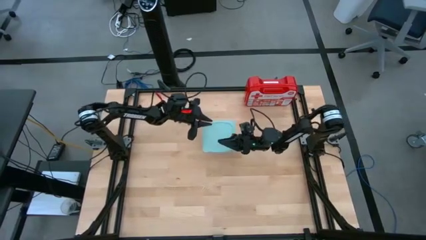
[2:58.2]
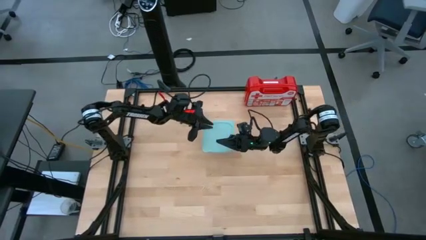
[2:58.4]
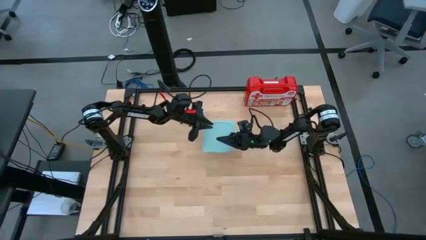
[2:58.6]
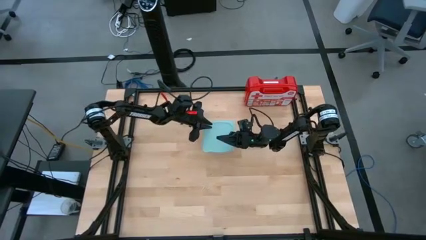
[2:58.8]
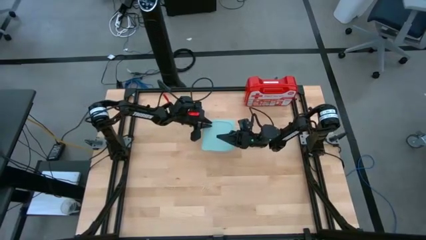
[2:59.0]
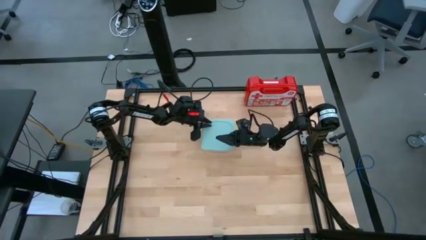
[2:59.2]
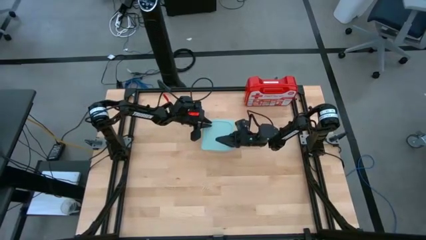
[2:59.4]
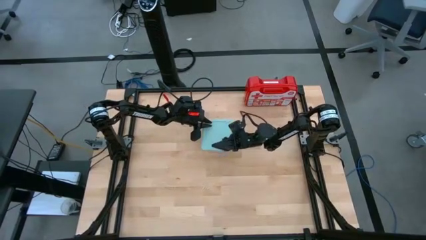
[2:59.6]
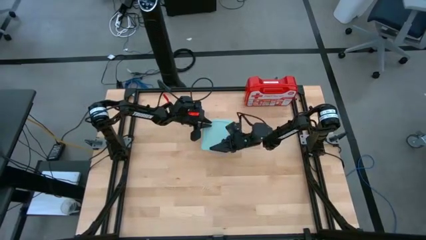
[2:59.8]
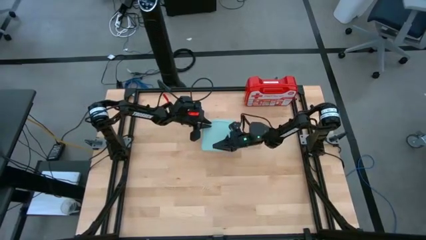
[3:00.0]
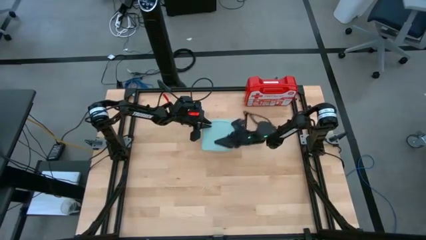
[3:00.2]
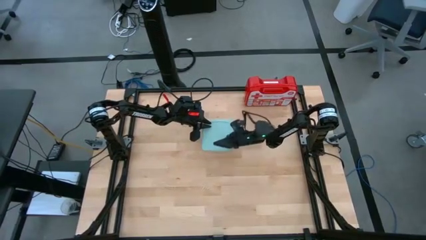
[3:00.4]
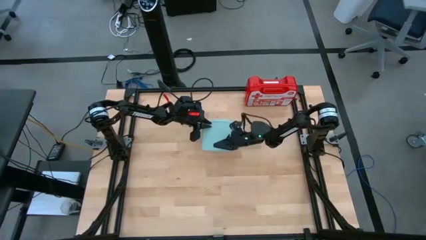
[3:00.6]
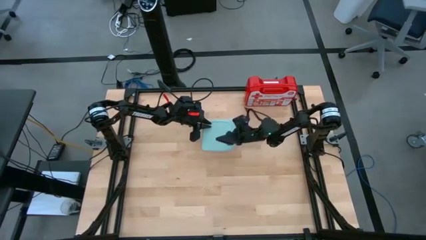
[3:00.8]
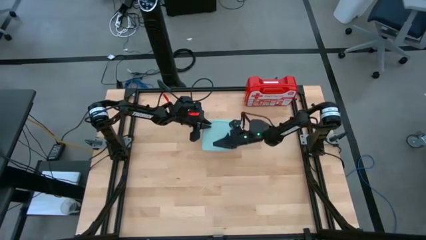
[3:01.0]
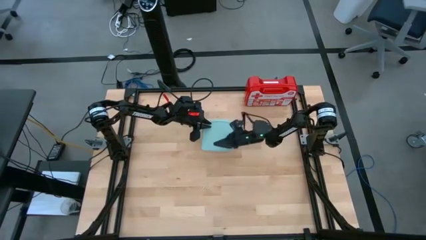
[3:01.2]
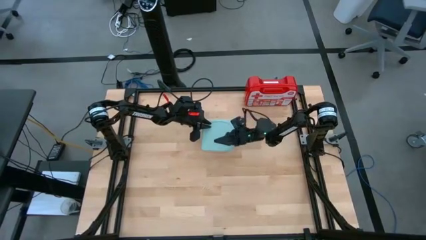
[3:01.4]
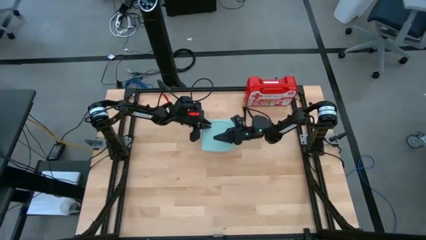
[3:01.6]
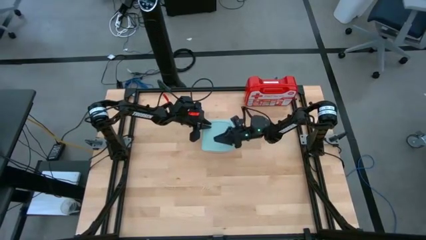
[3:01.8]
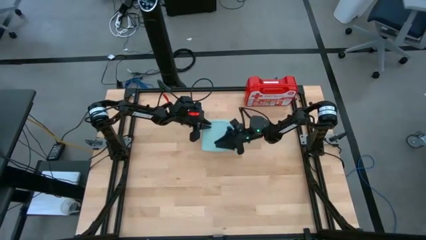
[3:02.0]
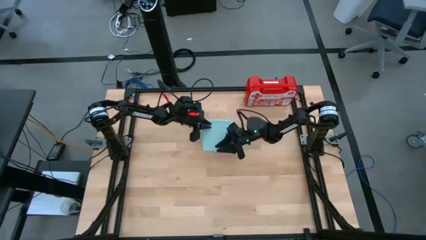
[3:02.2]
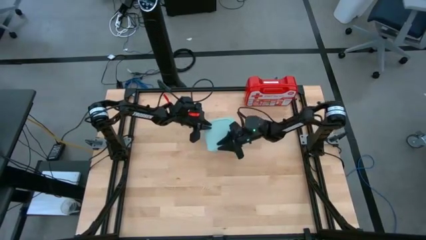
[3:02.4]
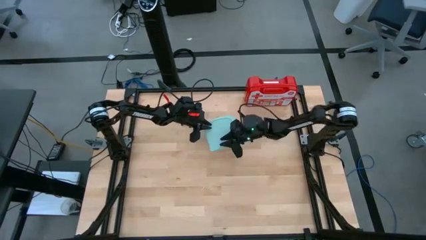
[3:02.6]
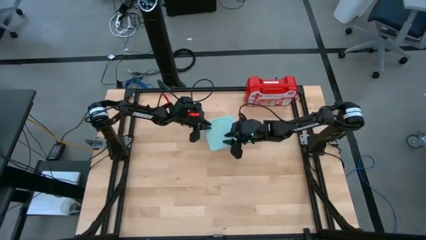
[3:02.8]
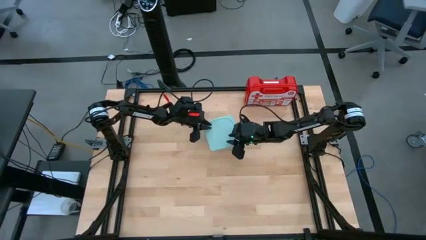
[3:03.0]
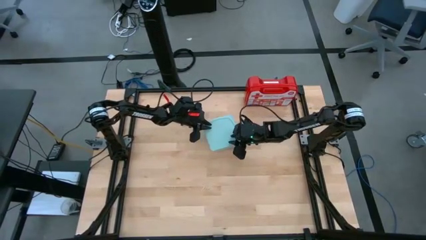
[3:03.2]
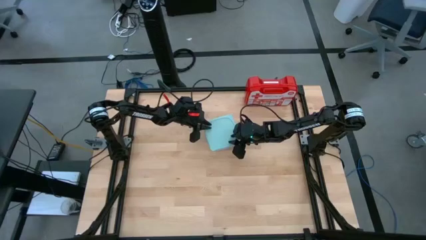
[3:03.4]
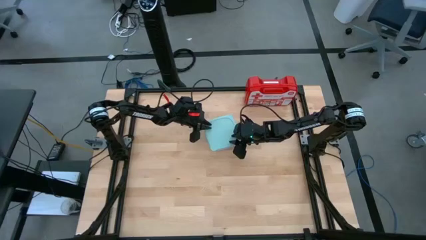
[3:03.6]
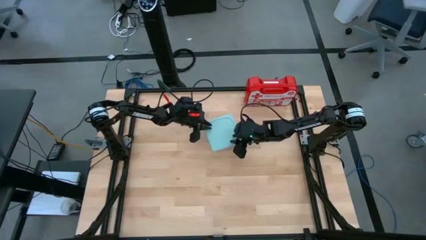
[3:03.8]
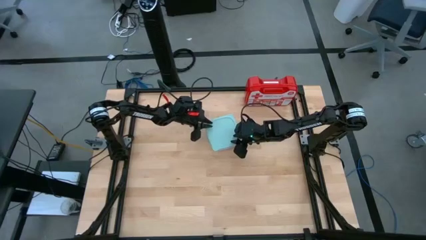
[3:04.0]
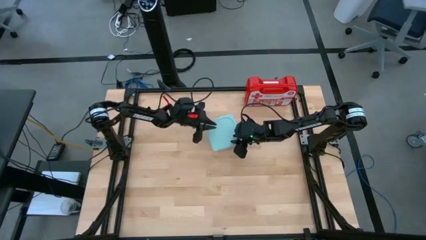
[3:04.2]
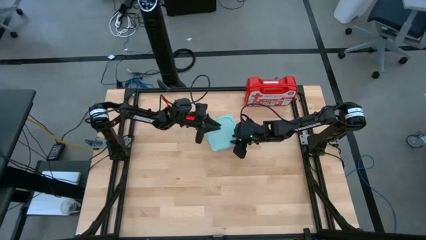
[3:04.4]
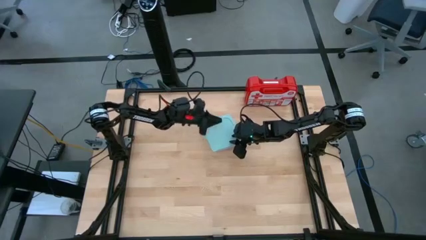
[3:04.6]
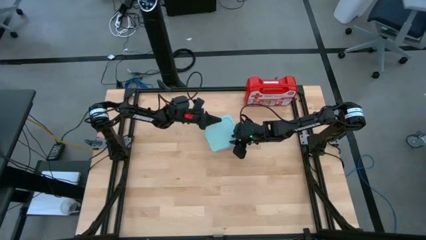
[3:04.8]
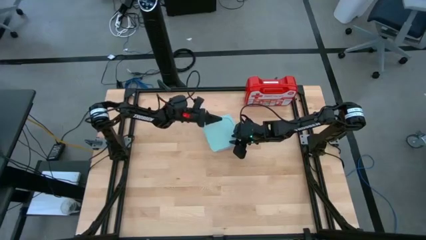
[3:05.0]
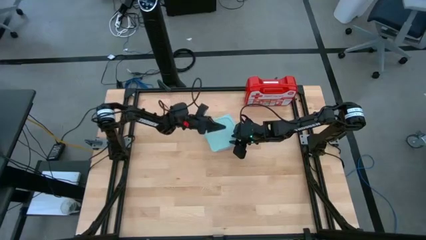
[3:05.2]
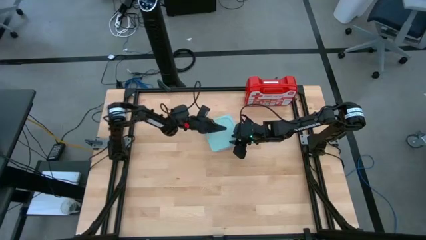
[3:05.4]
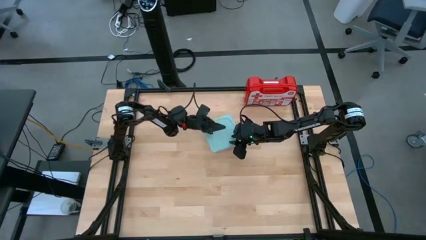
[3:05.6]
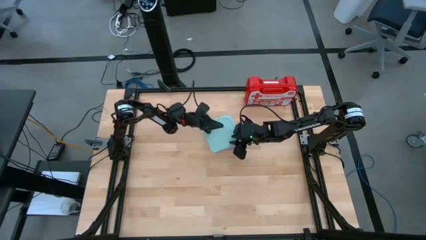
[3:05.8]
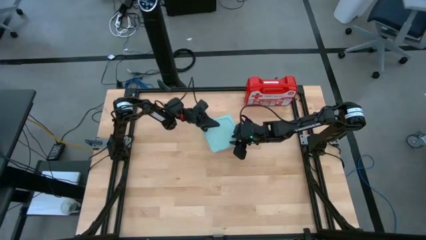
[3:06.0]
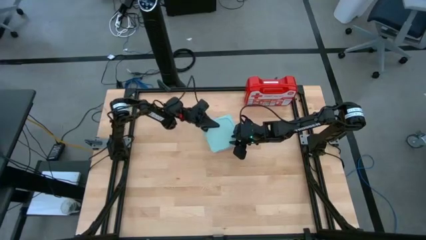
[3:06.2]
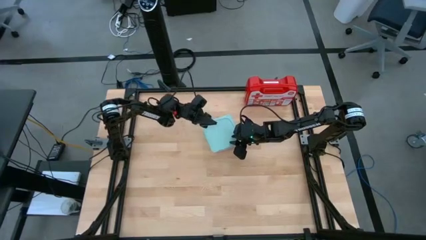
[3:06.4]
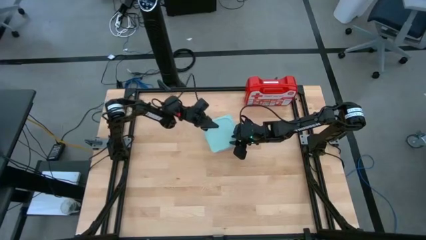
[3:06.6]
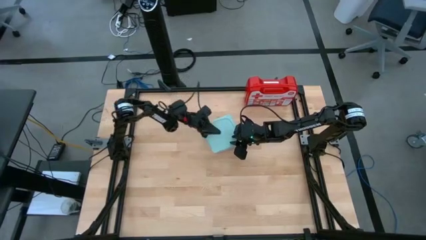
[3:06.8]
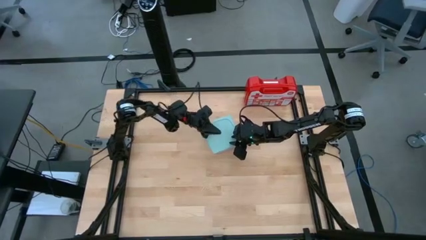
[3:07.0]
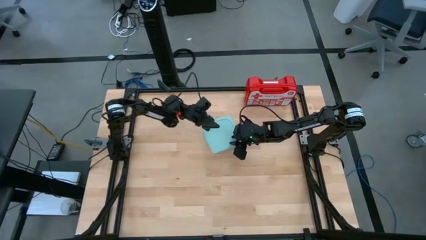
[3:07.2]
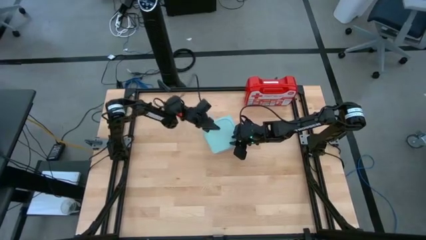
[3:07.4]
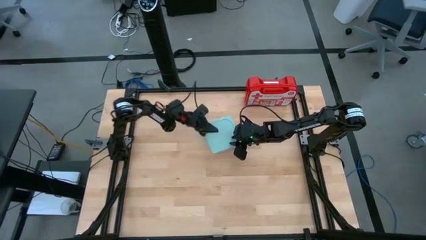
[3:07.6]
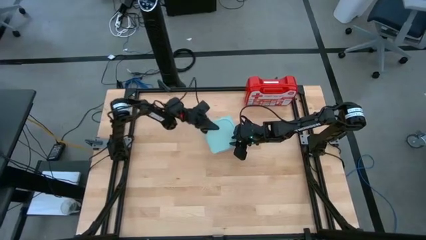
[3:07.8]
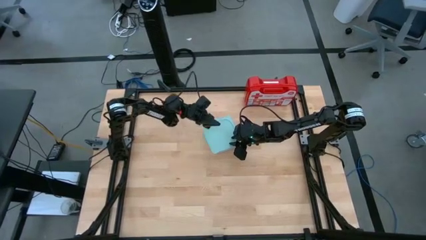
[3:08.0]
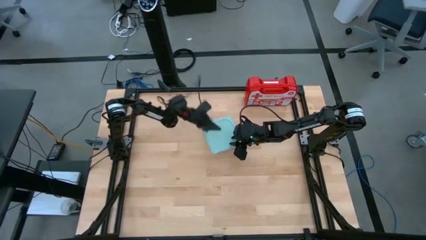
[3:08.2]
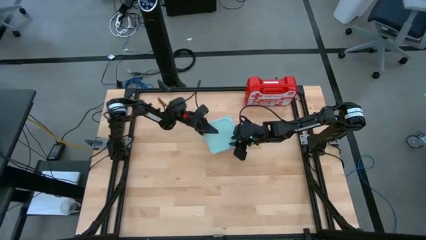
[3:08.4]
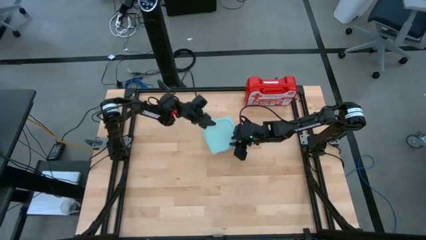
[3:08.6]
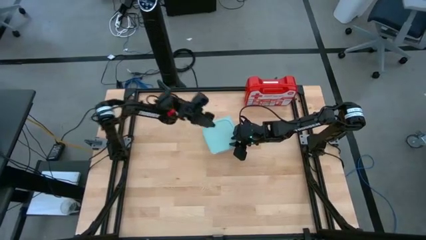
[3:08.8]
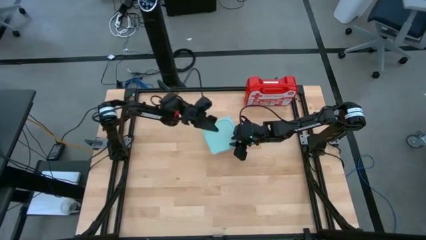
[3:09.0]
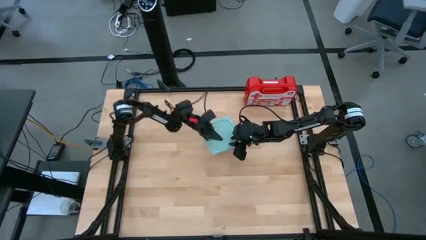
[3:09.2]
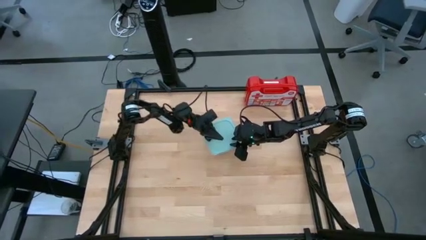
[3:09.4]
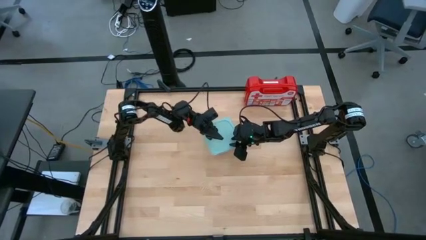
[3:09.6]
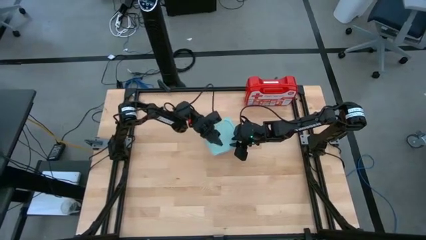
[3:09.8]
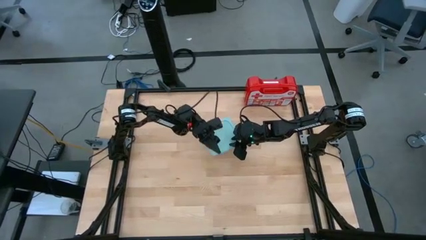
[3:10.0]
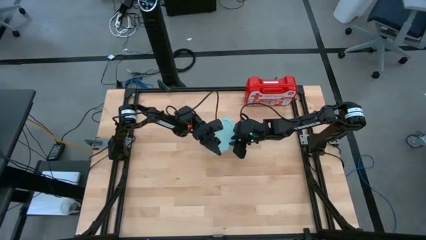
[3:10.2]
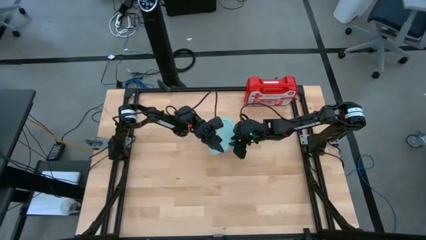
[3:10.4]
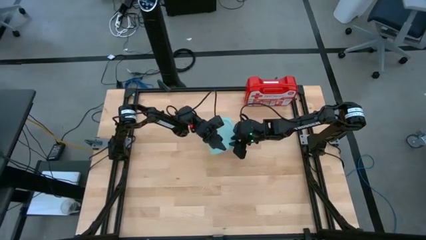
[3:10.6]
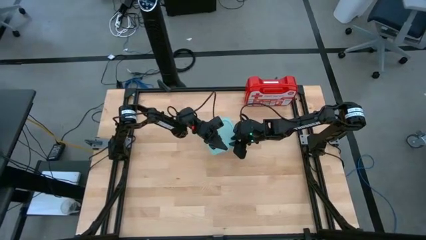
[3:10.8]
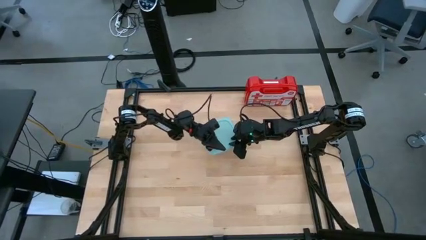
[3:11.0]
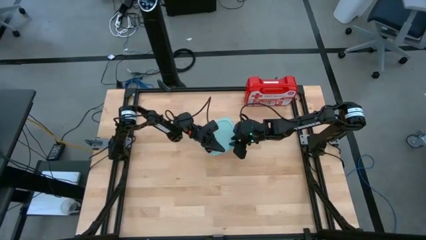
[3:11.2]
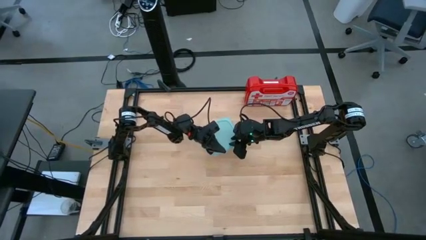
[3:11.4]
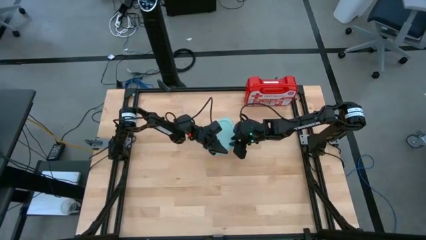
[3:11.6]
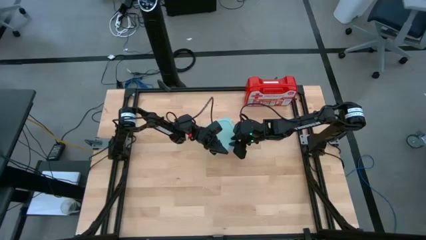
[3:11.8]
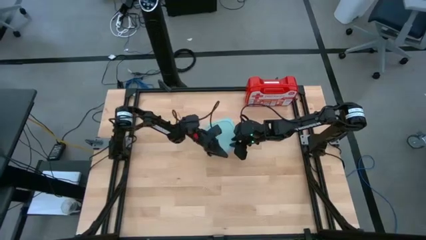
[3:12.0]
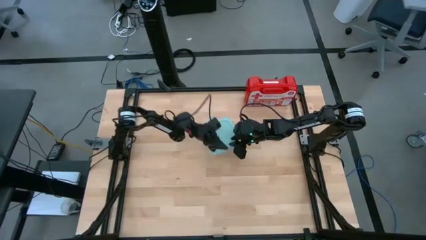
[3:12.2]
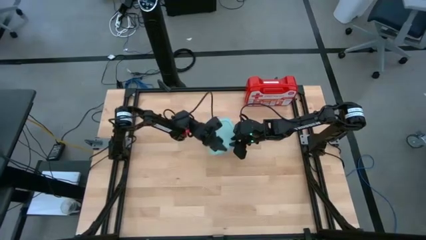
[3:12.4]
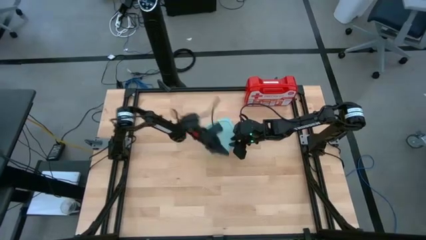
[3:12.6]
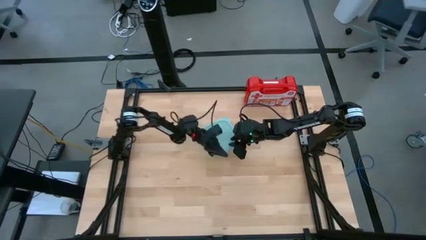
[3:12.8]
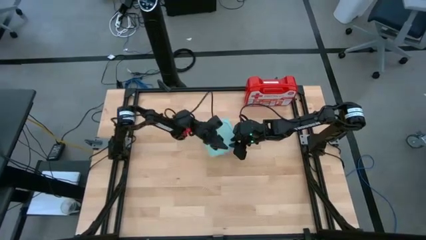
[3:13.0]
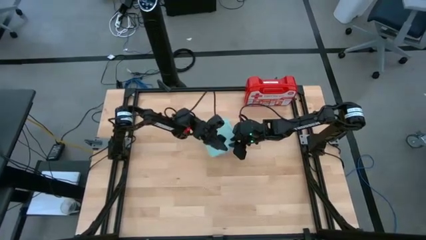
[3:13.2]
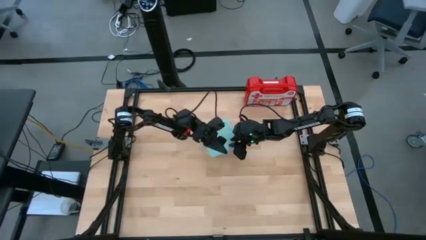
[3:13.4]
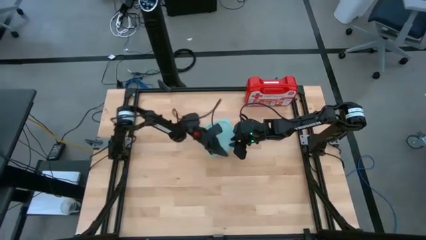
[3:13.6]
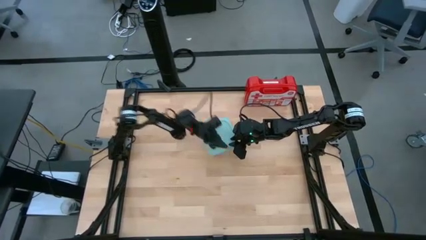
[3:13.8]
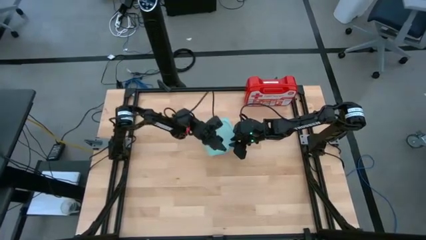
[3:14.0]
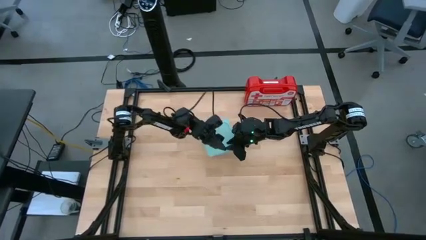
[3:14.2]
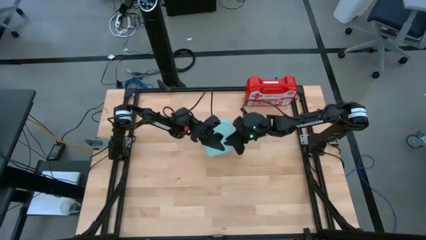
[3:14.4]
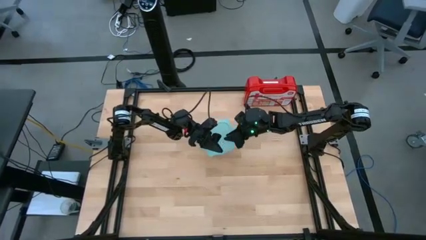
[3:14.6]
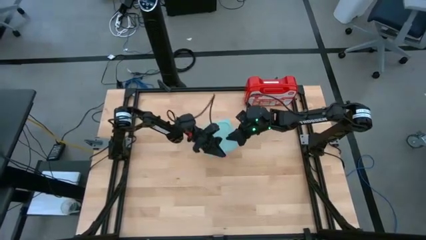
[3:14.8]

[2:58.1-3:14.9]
Task: Roll bandage
Close the plastic container
